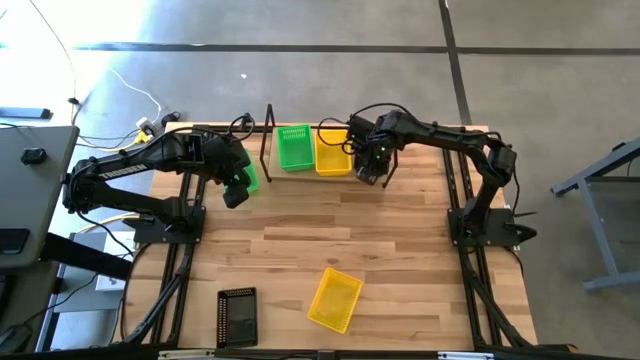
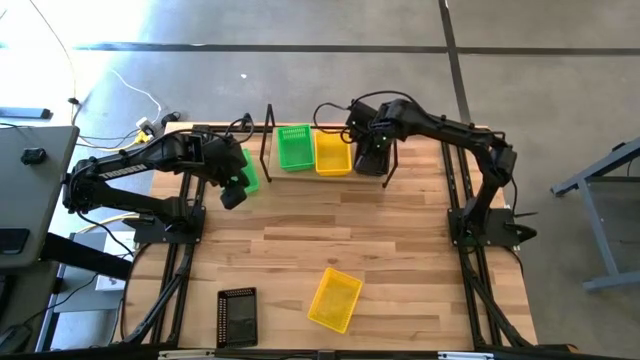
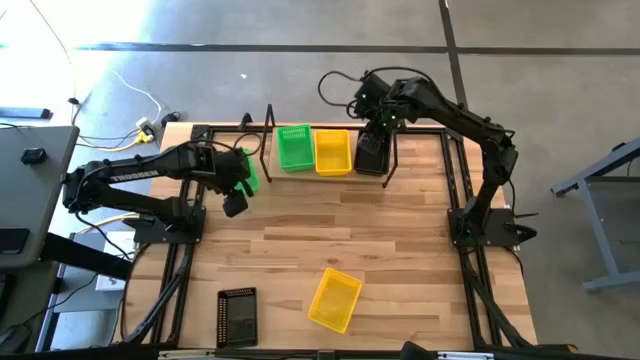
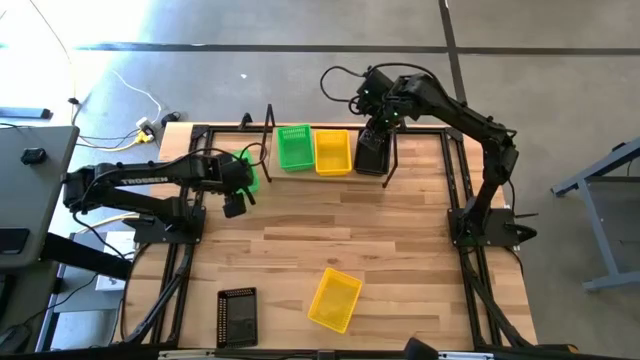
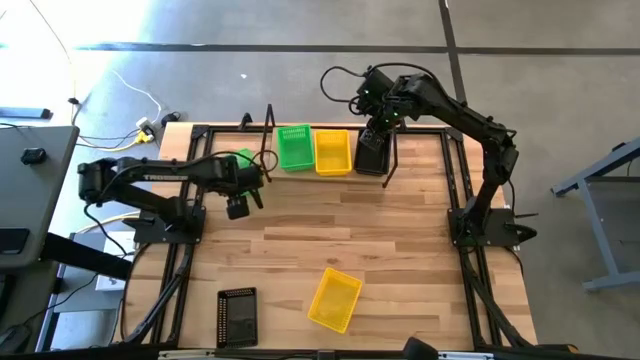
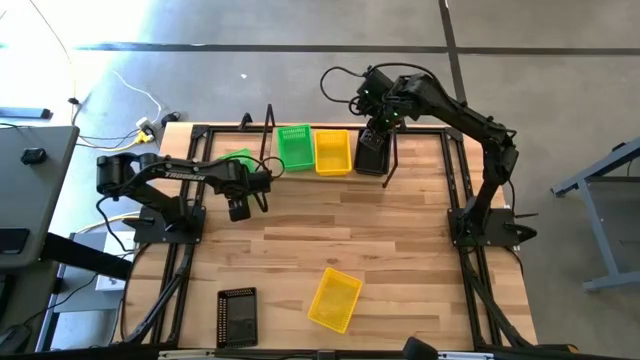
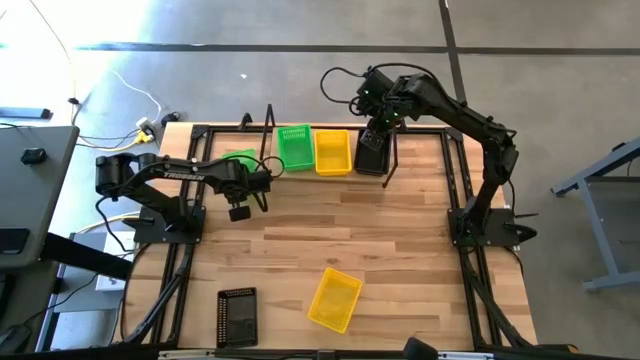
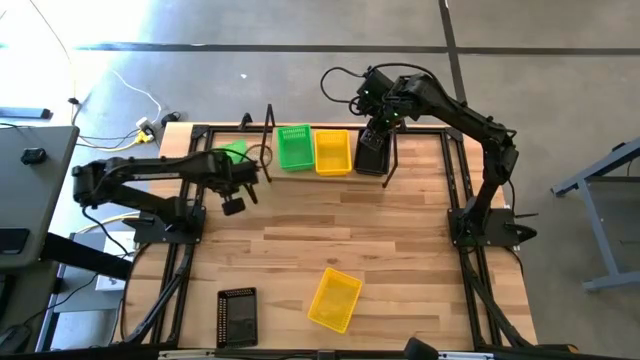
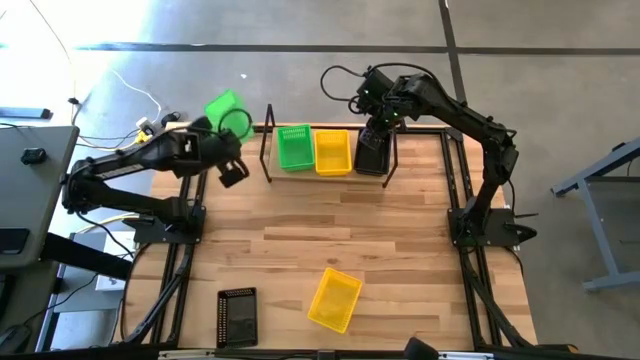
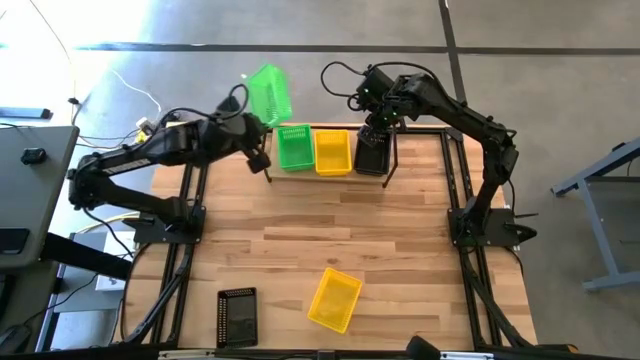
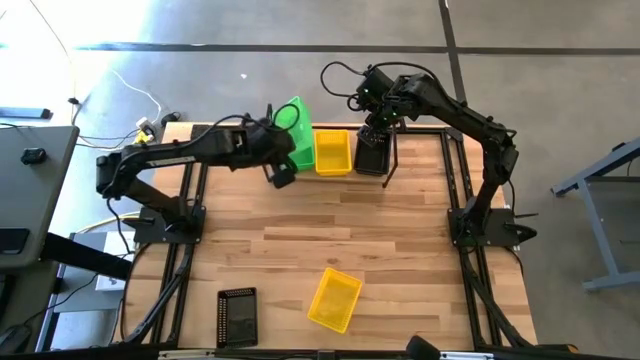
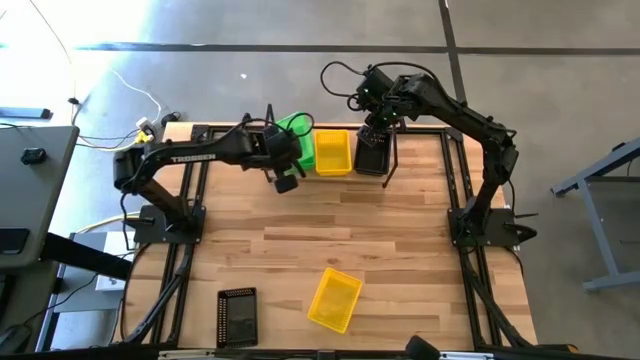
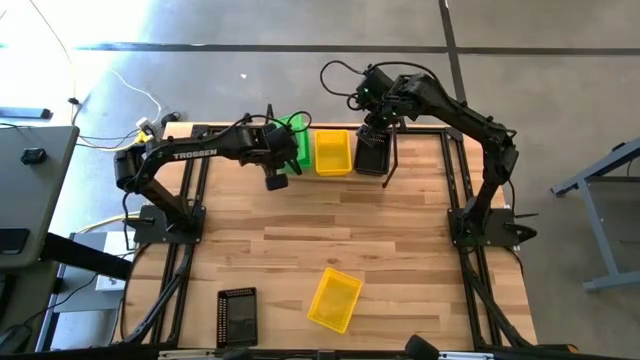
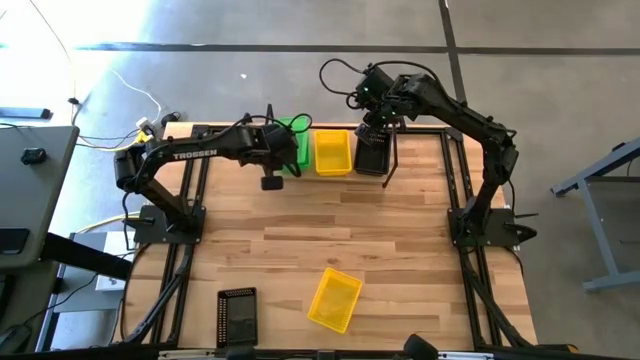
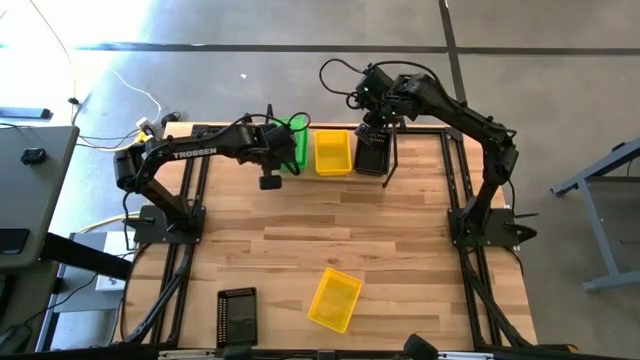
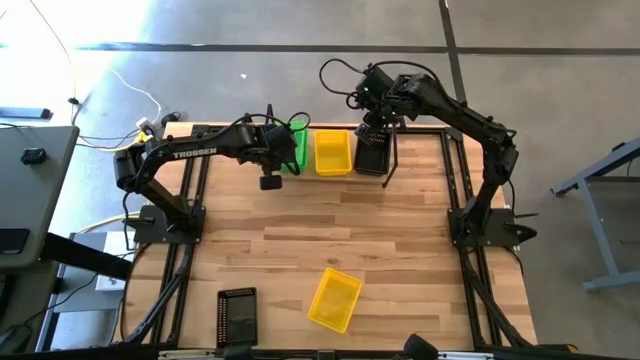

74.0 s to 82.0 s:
Task: Stack baskets on shelf by color
Stack the green bin on top of the green bins on the shelf

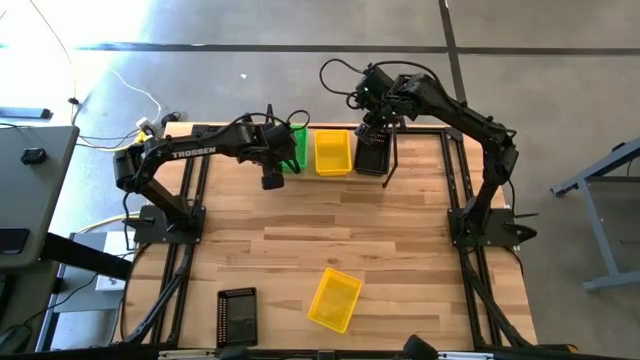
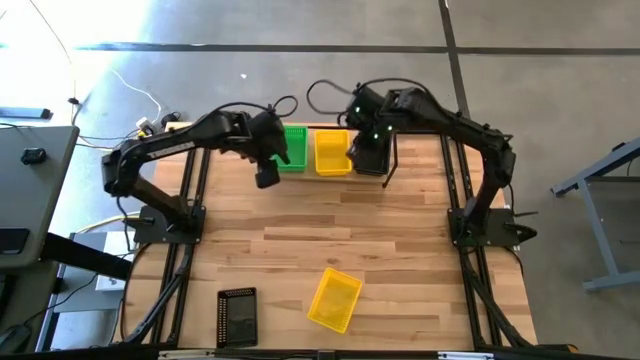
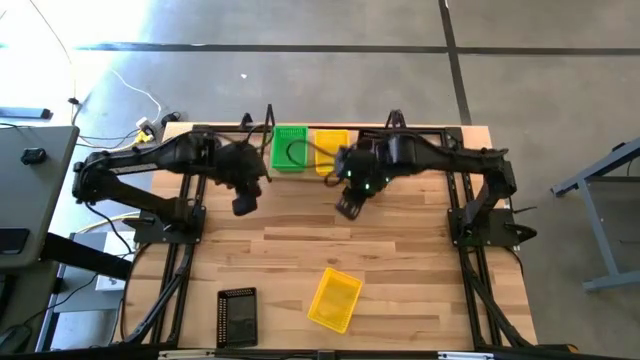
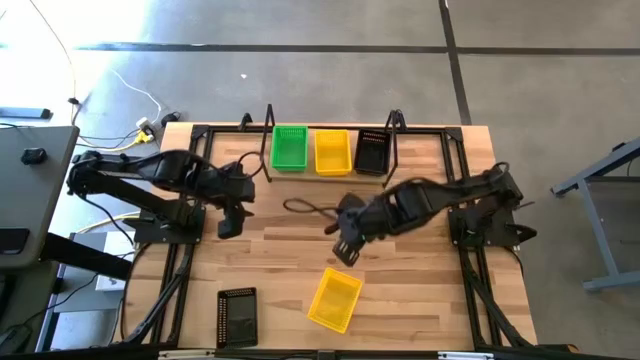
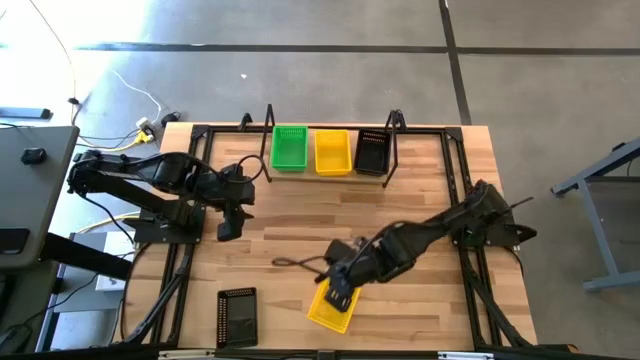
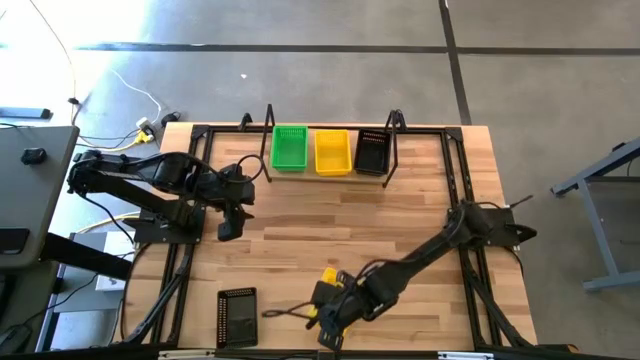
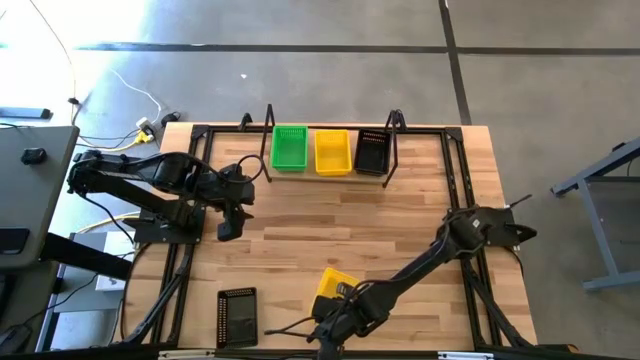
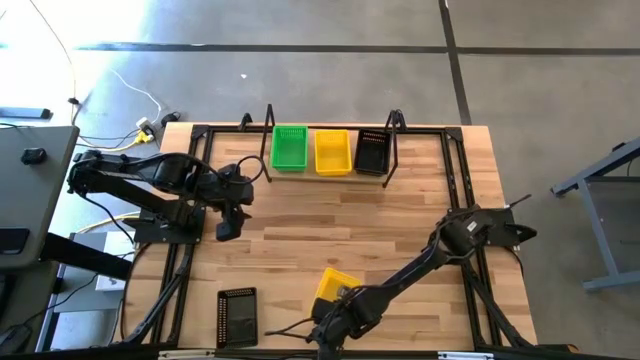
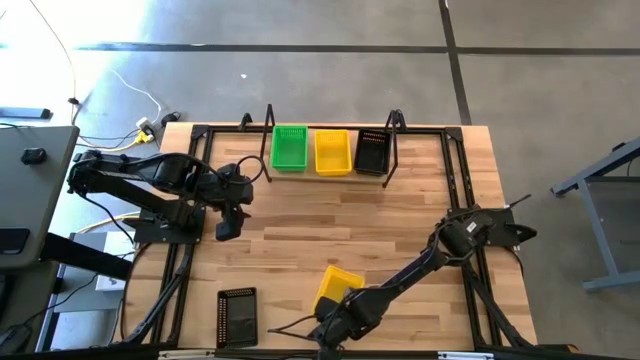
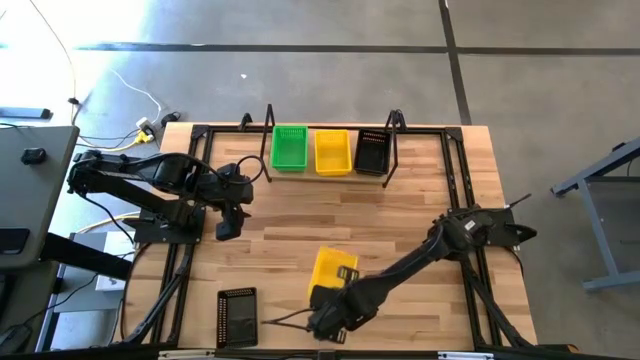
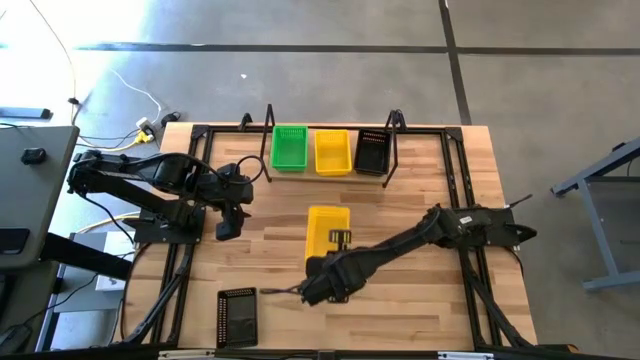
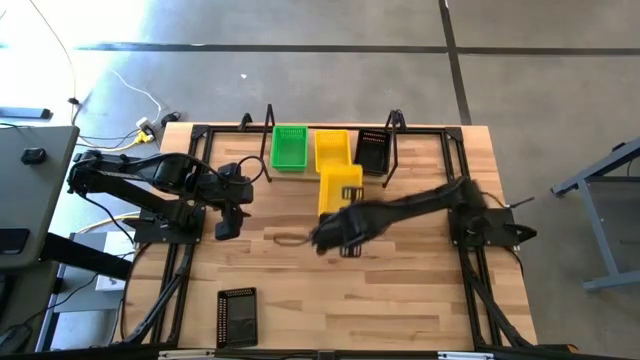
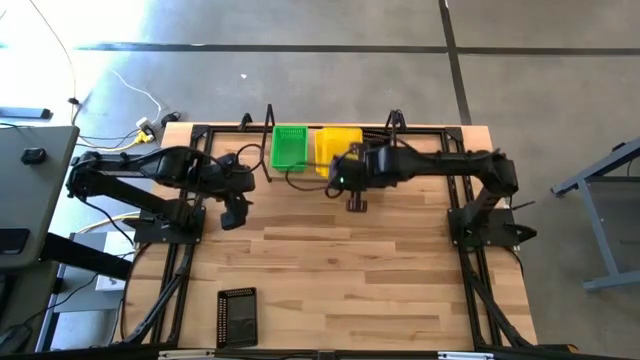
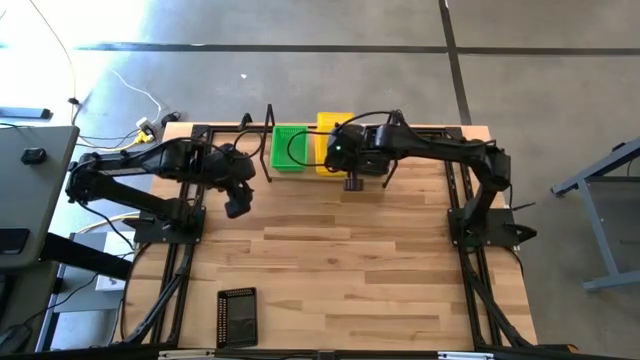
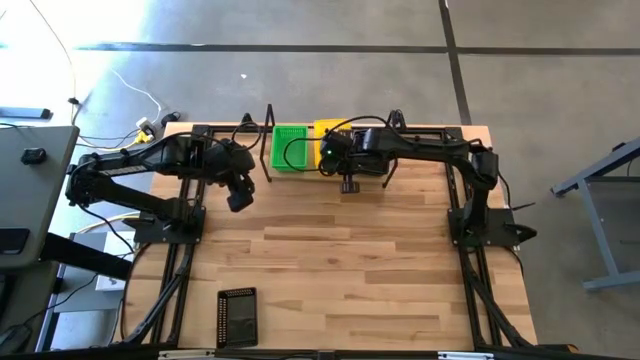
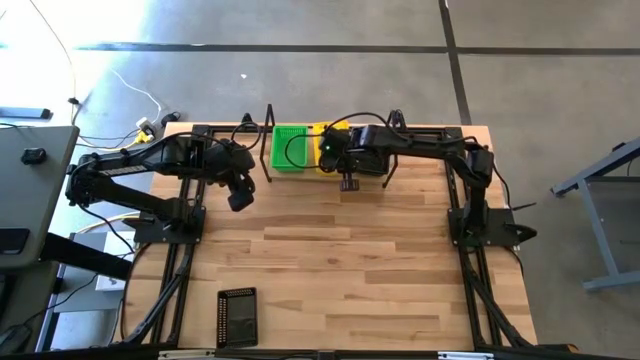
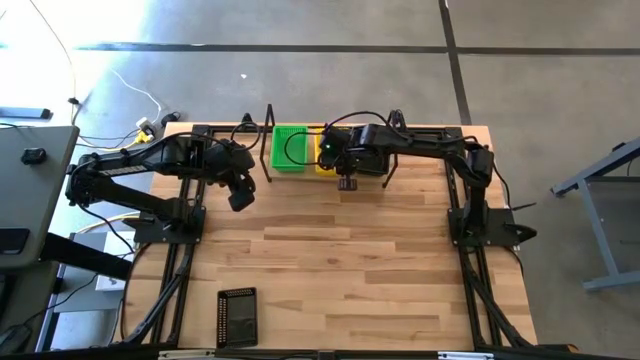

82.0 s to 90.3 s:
Stack the yellow bin on top of the yellow bins on the shelf

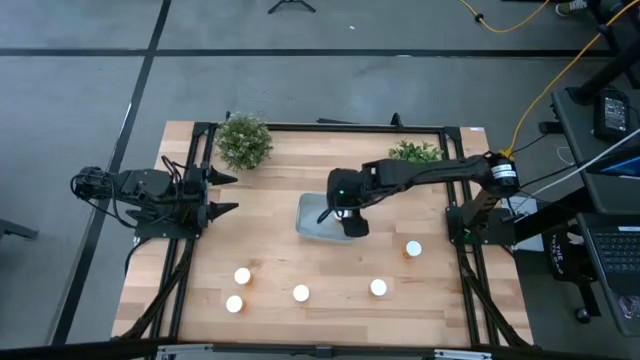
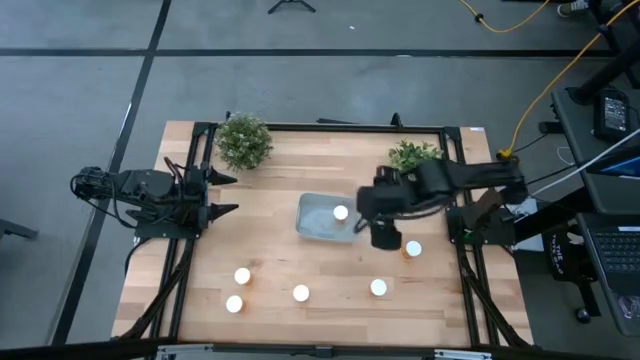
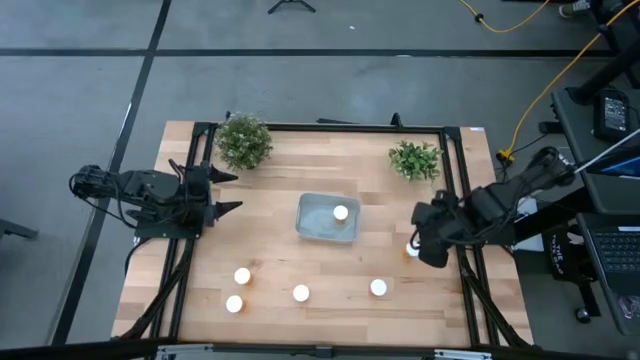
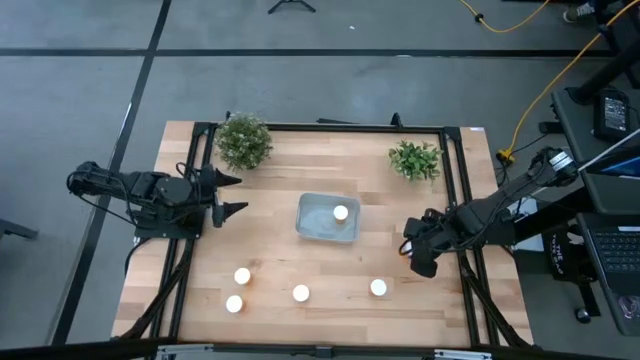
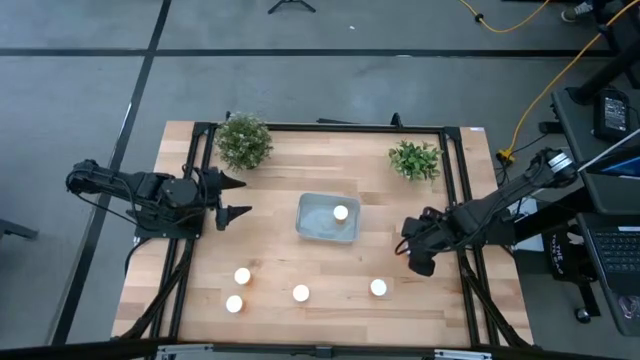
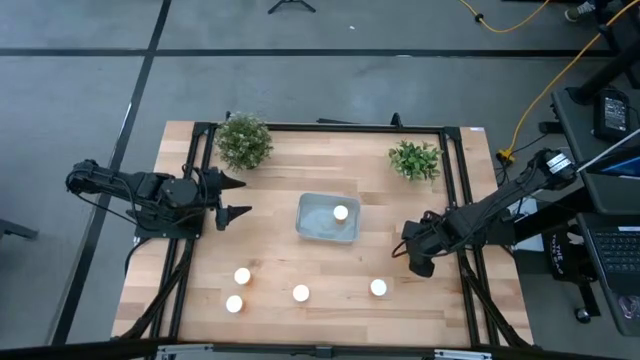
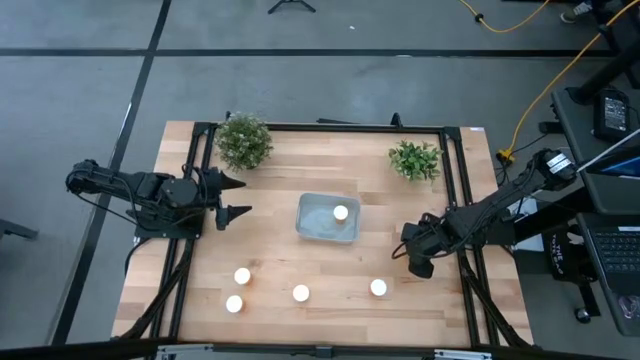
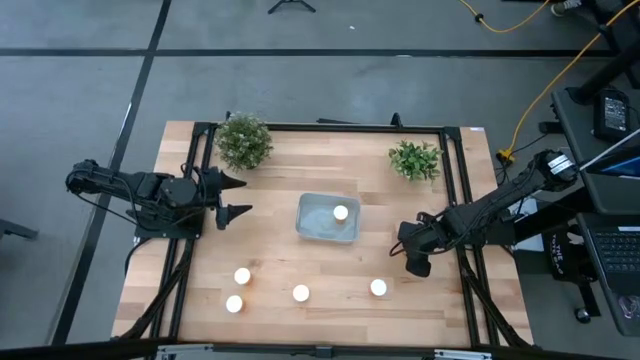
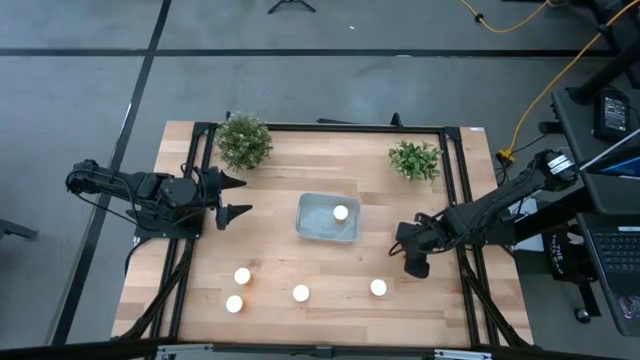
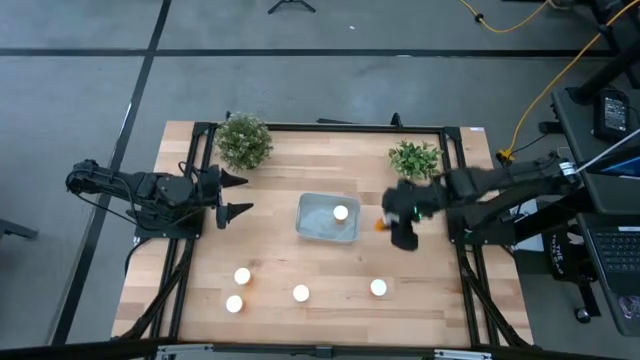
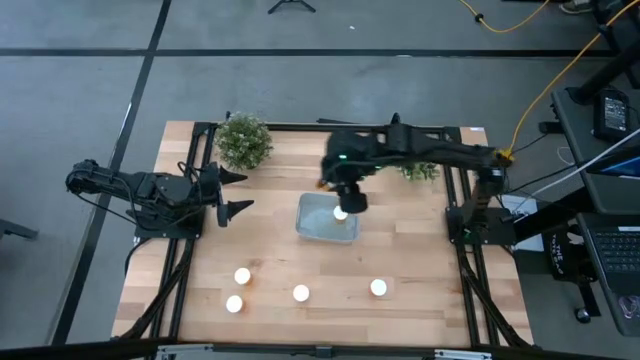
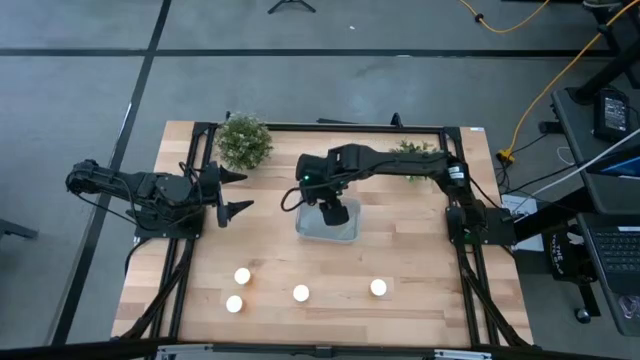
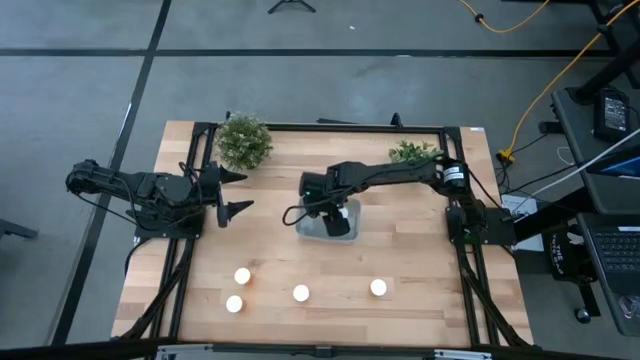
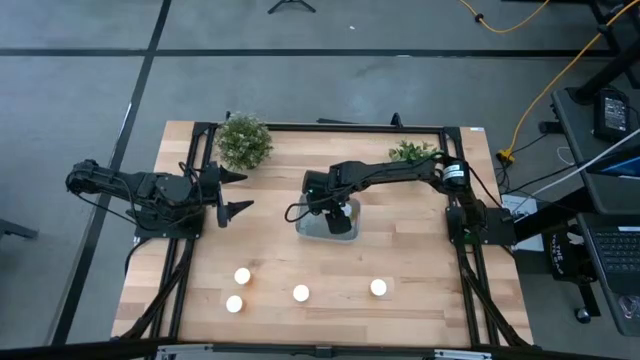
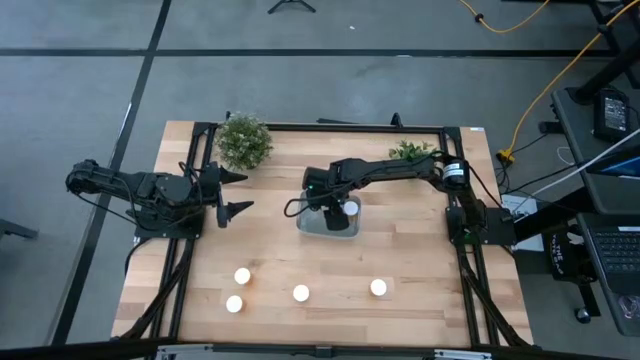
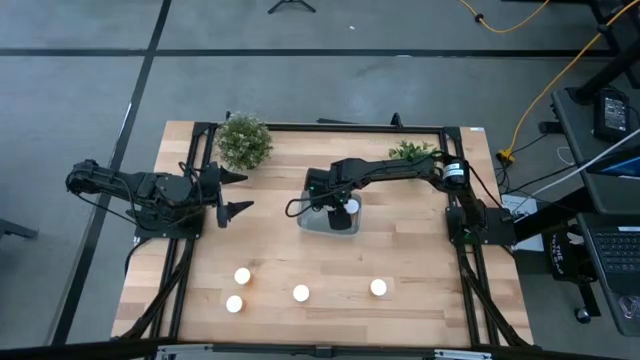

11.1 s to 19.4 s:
Task: Pick and place pill bottles into a basket
Put the orange pill bottle into the grey bin
